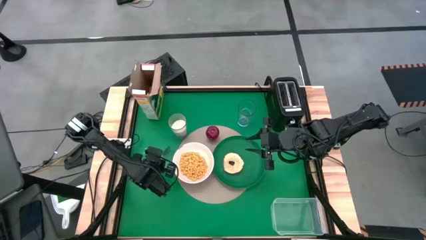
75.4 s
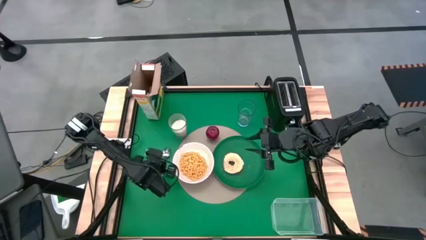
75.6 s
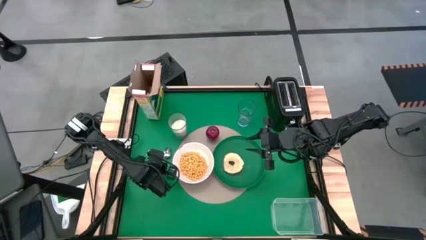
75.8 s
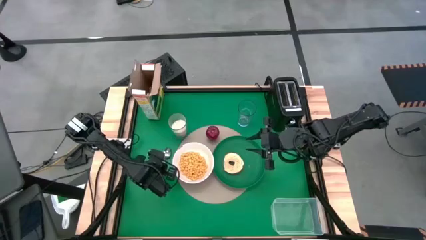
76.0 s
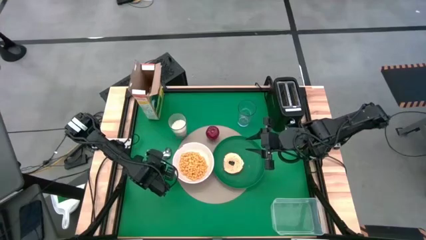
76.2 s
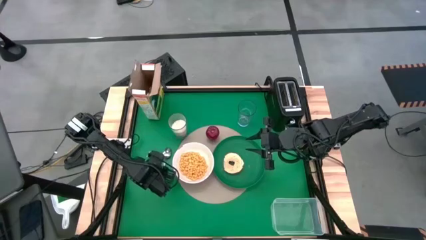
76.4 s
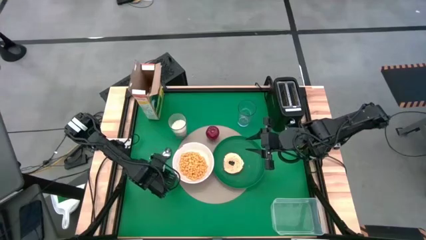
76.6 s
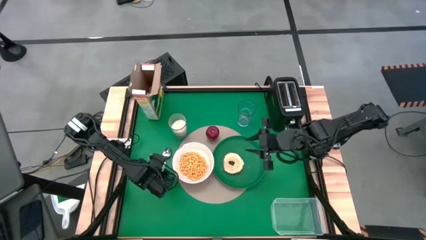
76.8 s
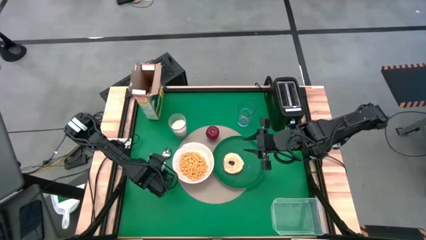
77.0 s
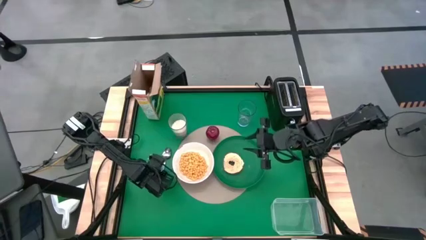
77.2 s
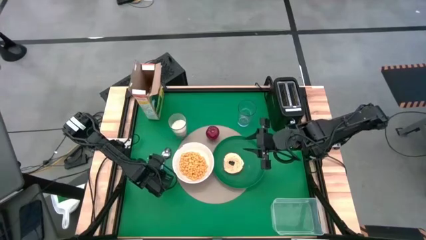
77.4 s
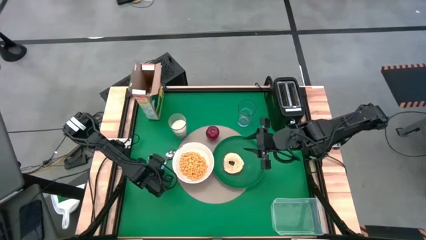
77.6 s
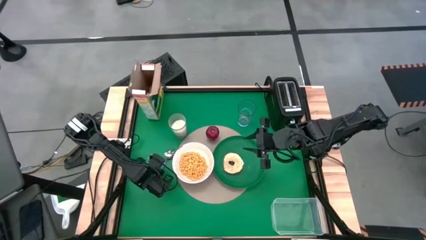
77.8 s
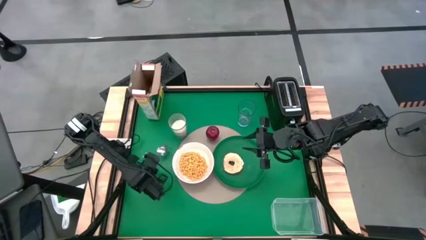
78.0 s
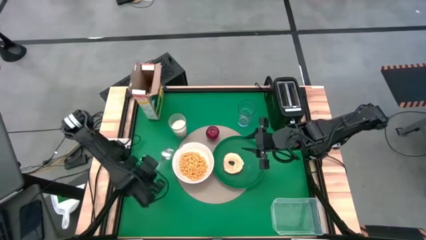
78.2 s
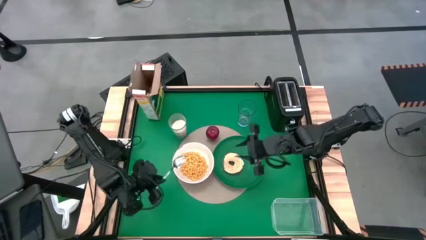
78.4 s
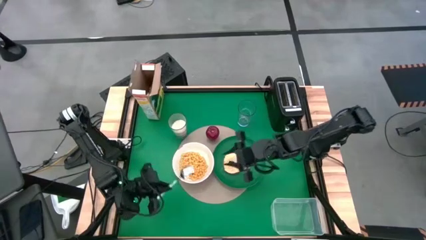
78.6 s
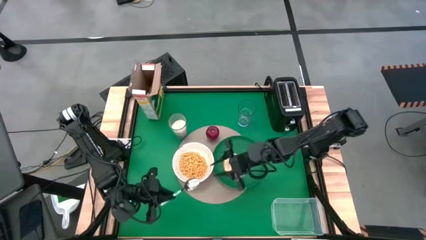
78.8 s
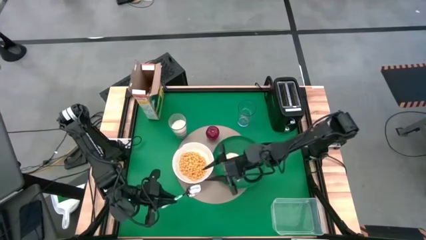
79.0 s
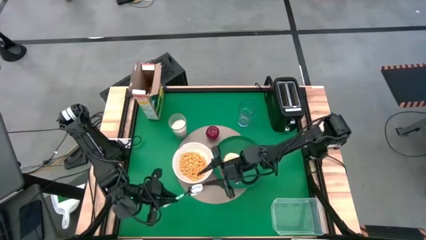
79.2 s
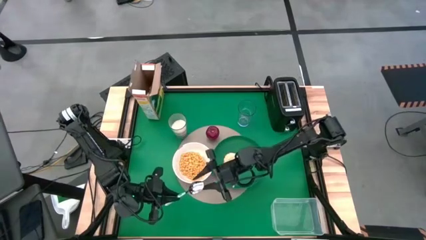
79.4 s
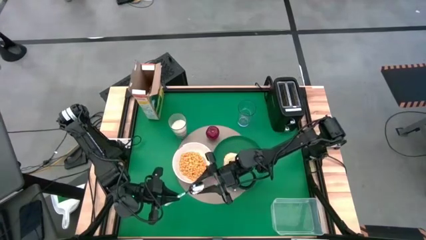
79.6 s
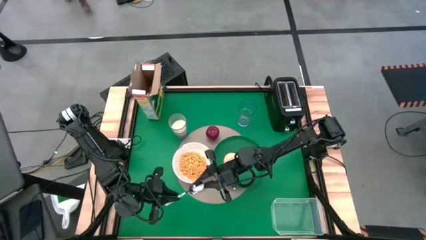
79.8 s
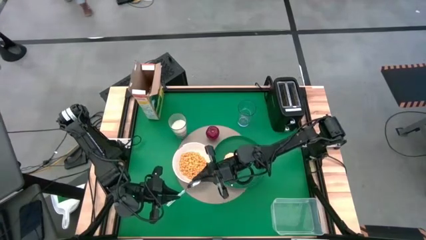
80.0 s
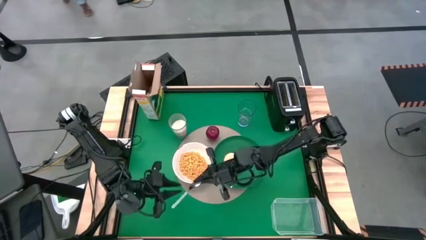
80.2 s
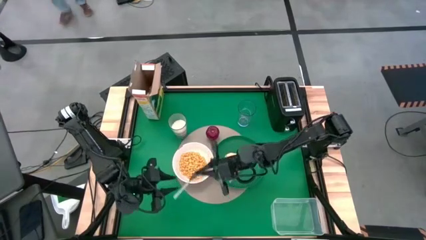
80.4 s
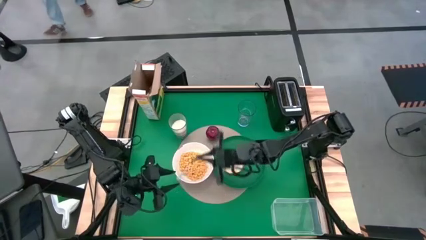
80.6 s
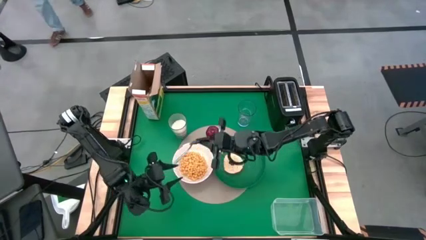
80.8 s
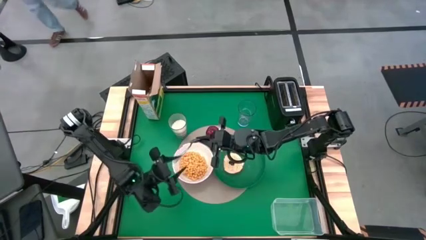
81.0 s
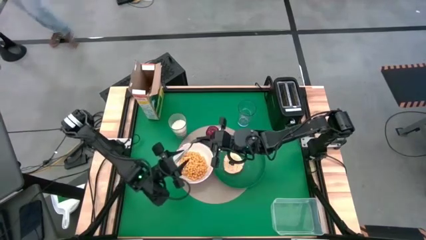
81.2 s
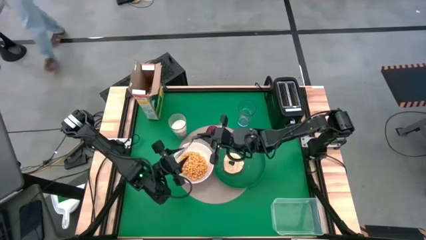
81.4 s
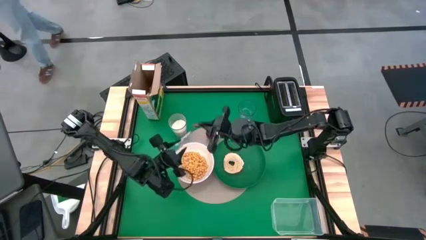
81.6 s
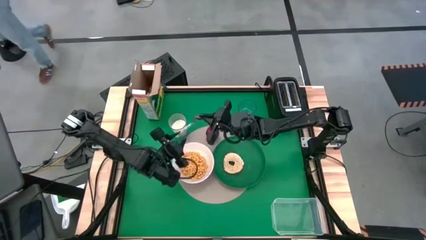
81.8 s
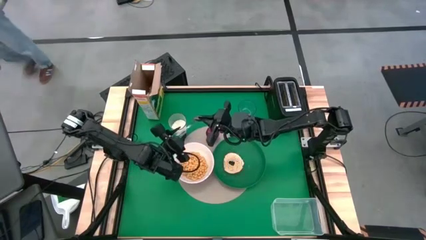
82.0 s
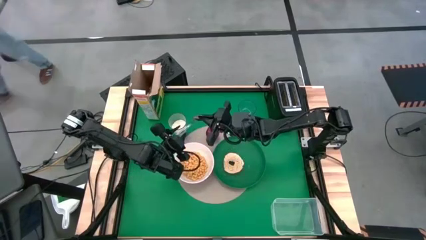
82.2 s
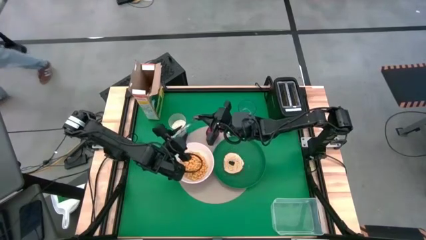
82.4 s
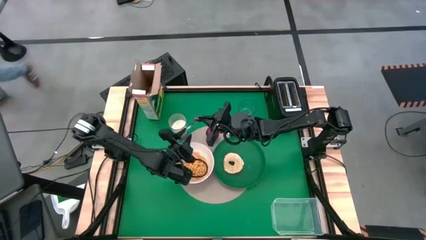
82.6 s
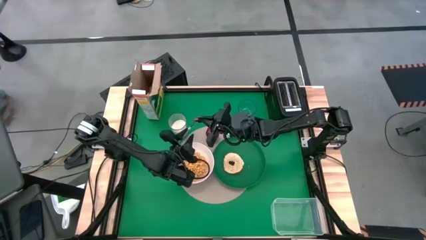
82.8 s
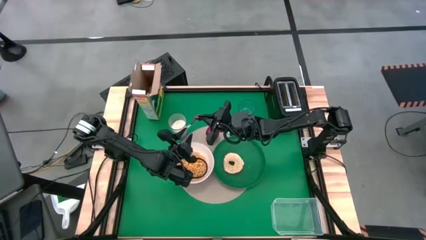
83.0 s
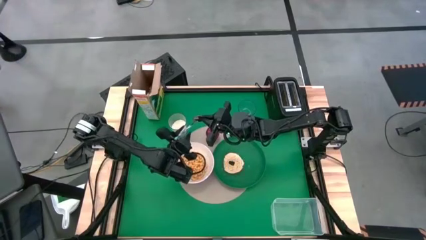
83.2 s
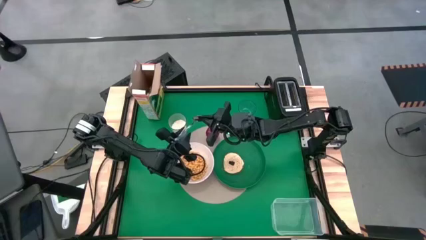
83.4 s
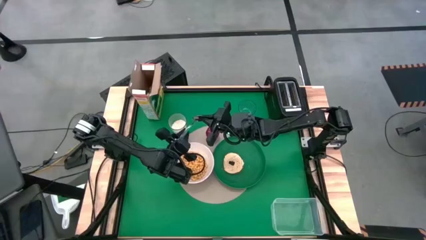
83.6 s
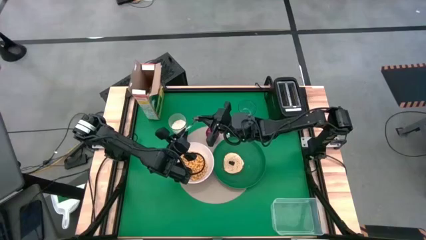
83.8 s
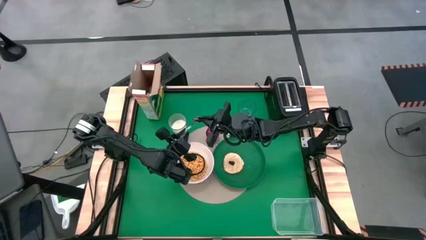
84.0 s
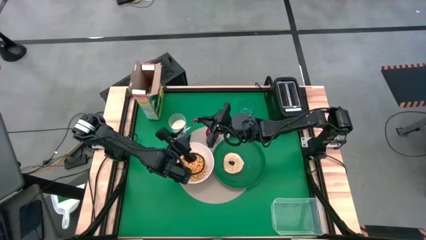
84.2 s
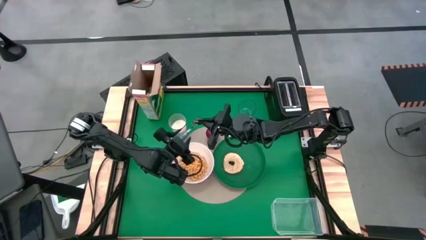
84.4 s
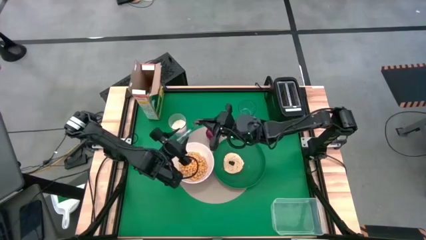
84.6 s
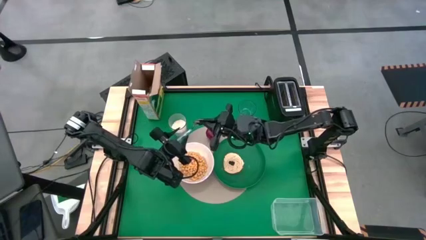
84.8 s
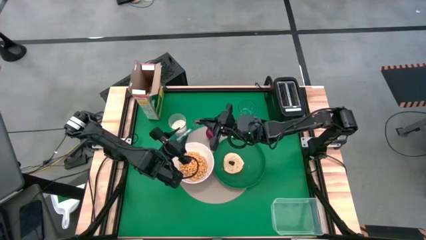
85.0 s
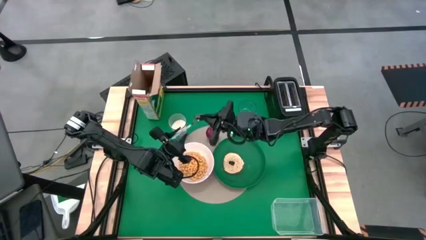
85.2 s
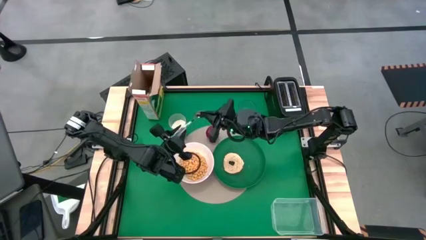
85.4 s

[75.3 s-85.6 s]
Task: Arrange a breakfast setting
Put the spoon on the table mat to the right of the bowl

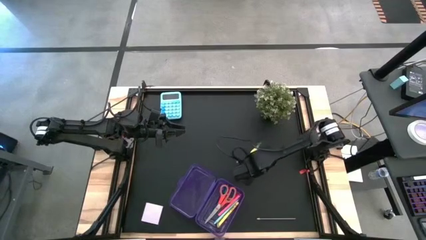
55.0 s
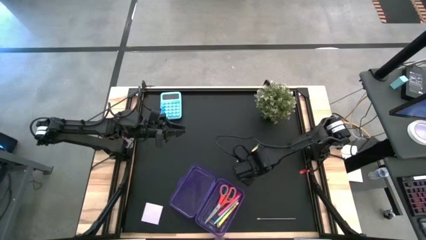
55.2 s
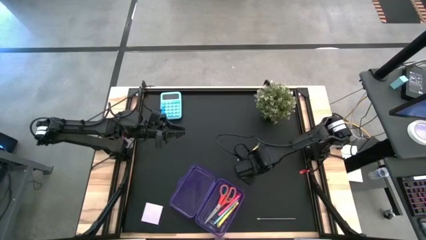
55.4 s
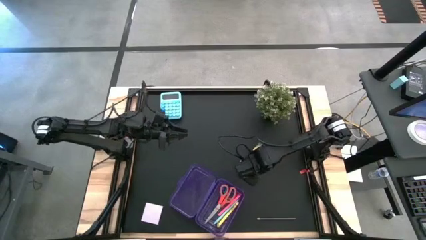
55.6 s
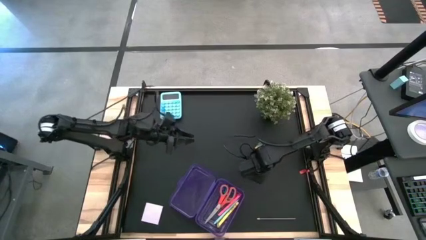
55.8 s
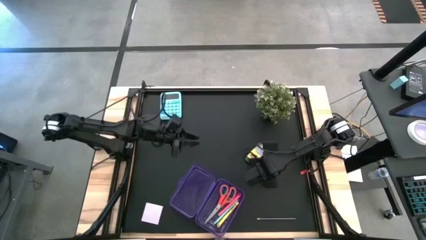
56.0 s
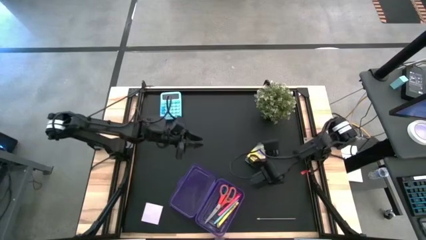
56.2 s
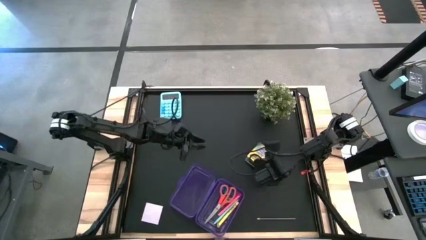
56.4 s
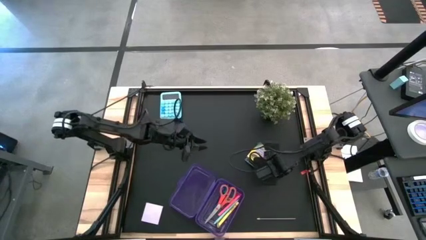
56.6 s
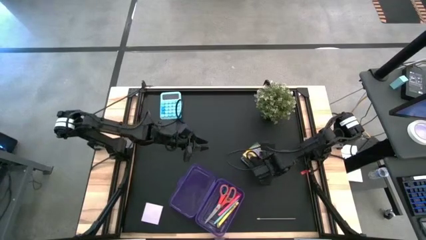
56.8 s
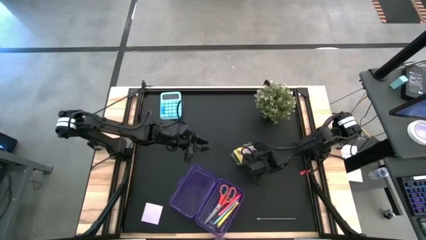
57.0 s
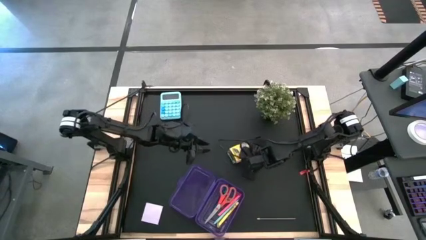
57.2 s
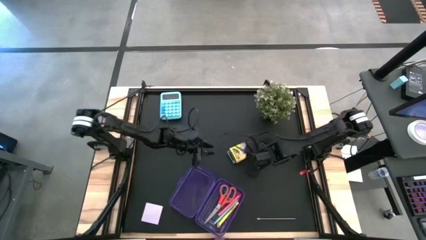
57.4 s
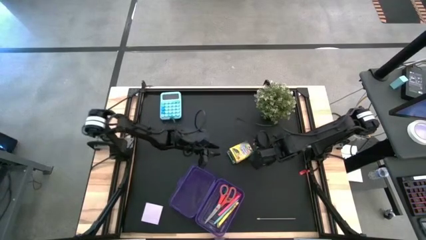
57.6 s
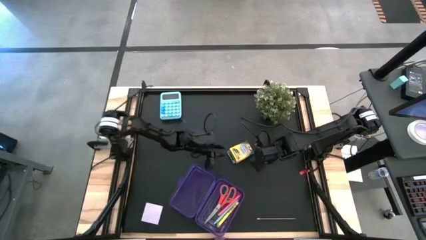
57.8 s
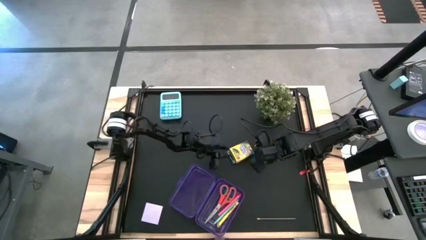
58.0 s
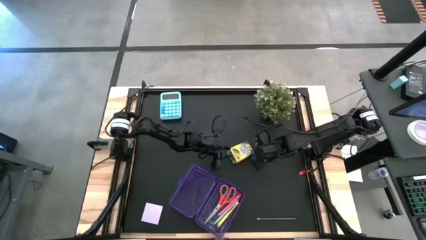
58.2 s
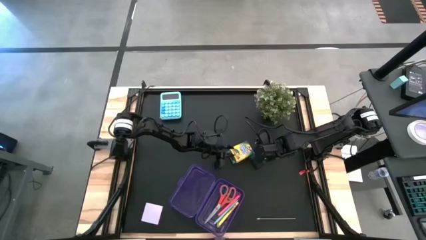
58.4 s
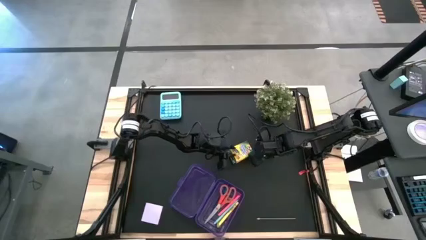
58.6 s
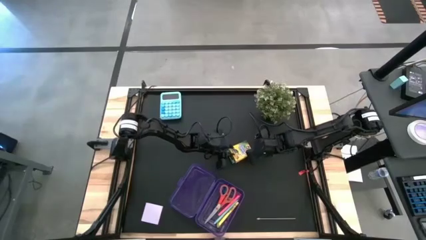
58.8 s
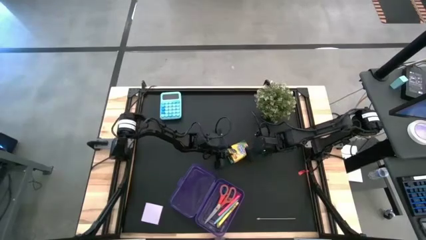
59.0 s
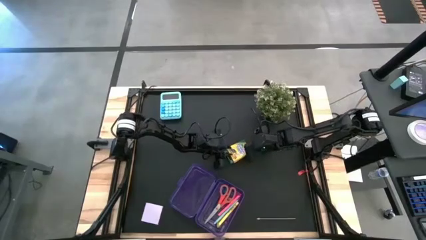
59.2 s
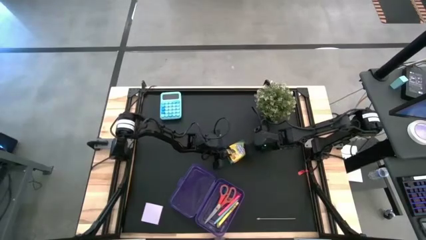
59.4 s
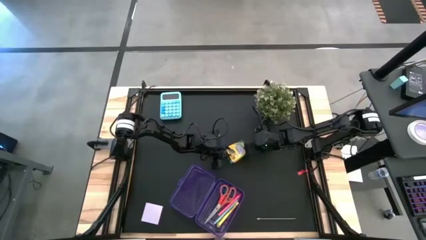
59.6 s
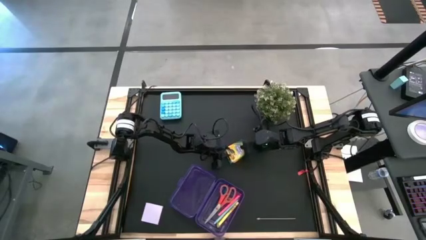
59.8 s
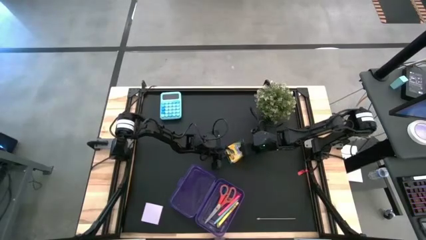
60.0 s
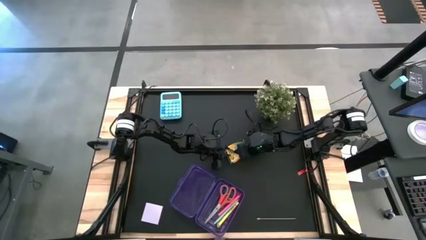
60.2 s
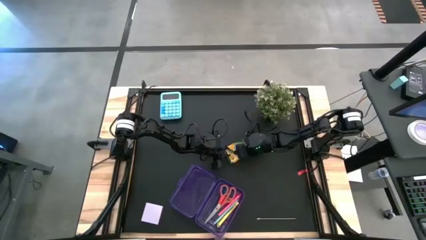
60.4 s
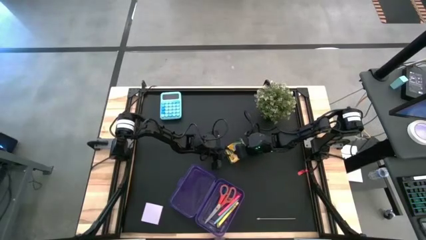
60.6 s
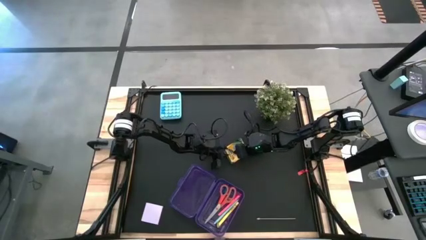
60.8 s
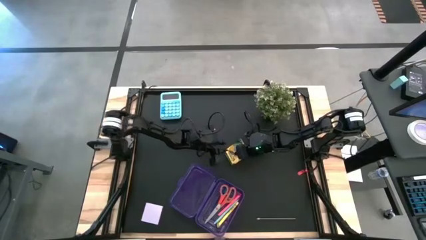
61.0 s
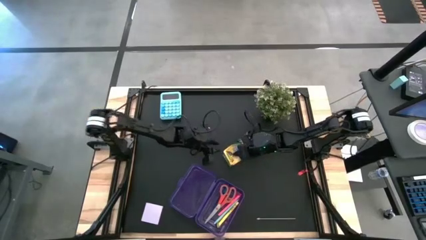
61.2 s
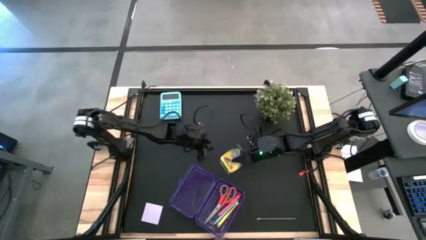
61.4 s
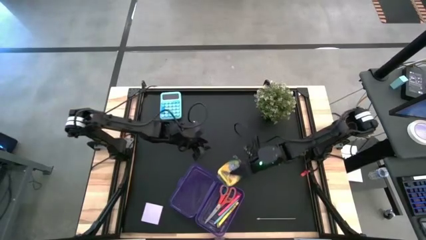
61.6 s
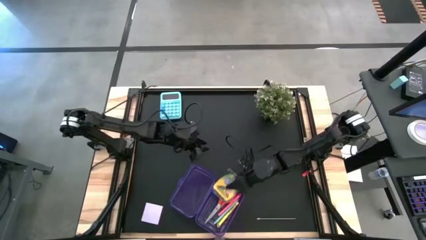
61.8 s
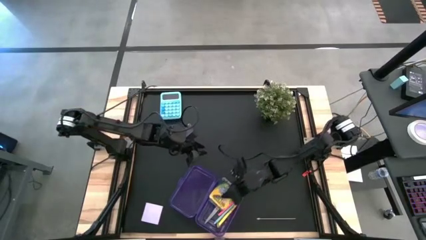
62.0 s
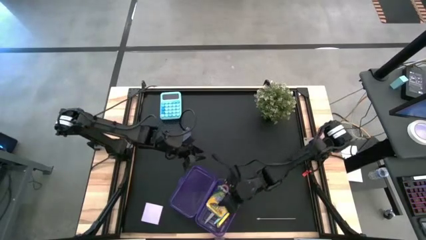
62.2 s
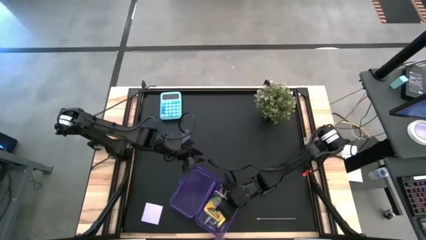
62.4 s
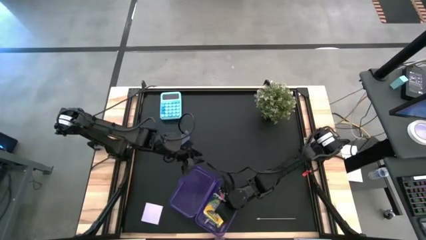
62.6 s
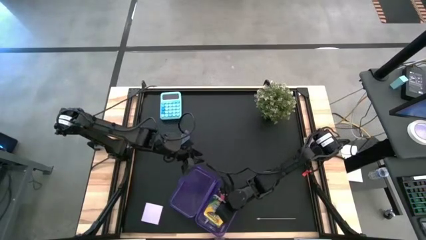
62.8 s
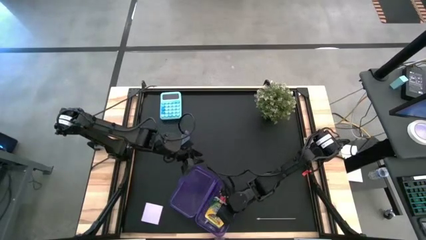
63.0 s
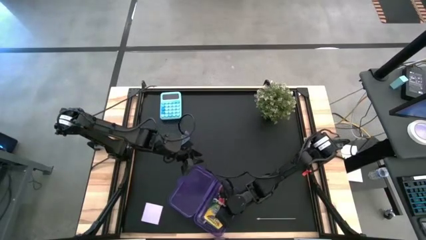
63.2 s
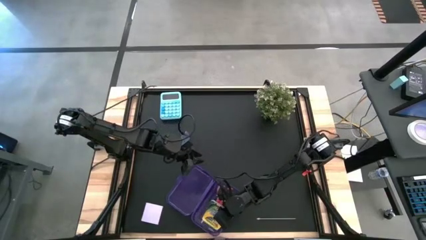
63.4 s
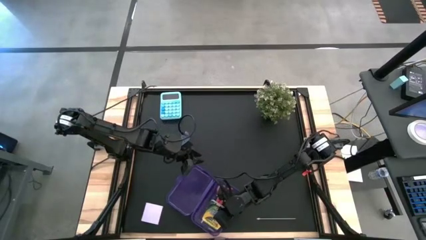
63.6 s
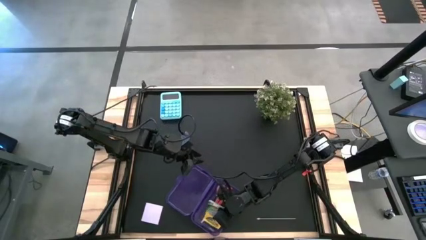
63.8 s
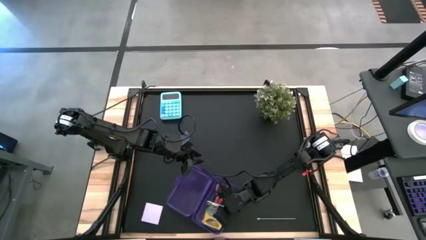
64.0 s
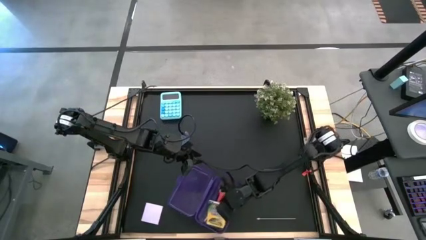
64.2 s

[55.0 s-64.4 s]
Task: Pack school essentials
Put the yellow crayon box into the purple supply box
